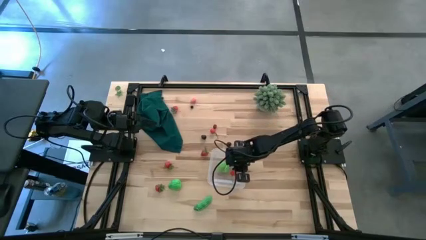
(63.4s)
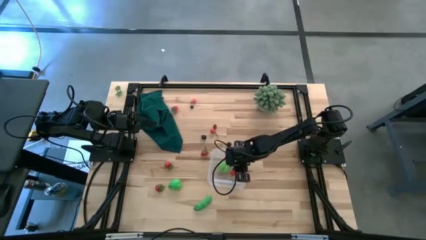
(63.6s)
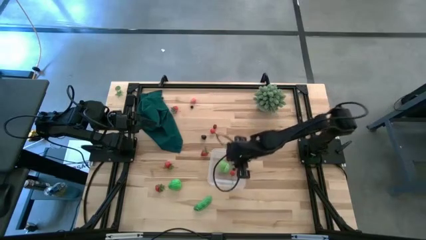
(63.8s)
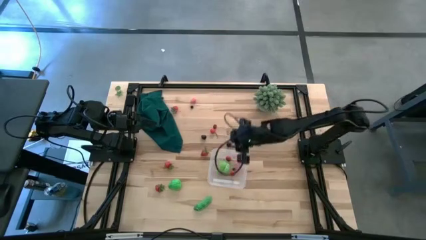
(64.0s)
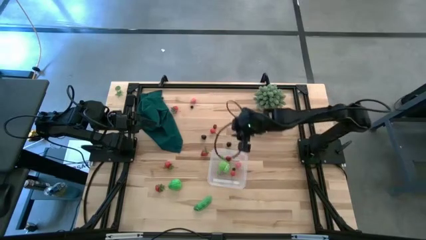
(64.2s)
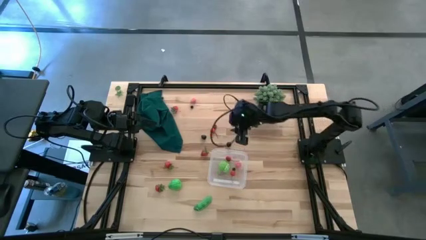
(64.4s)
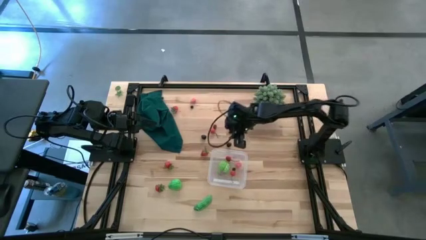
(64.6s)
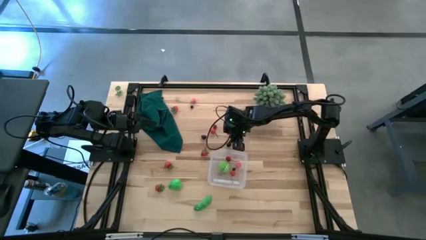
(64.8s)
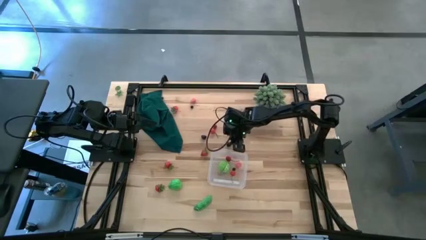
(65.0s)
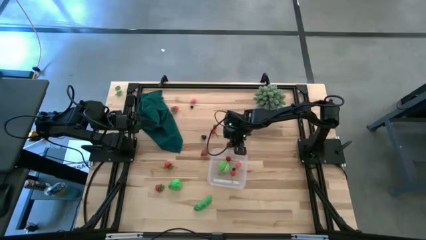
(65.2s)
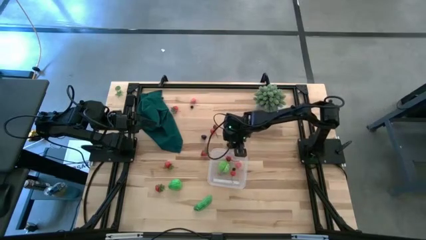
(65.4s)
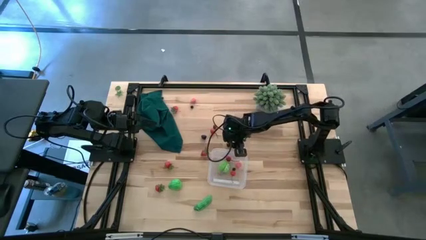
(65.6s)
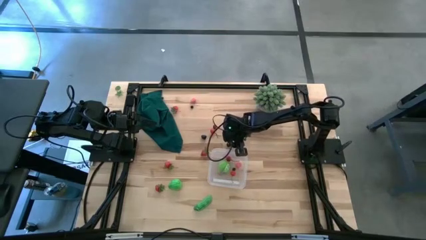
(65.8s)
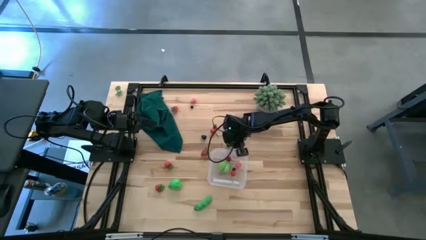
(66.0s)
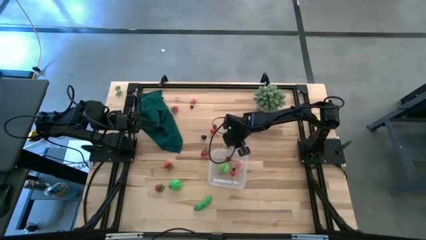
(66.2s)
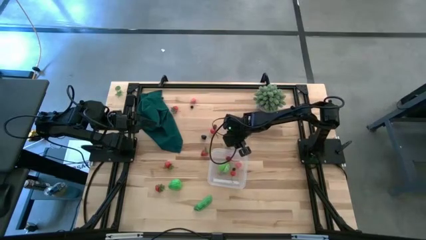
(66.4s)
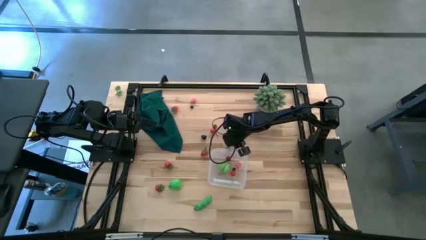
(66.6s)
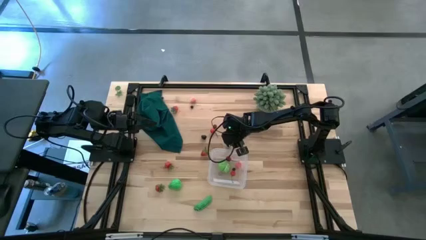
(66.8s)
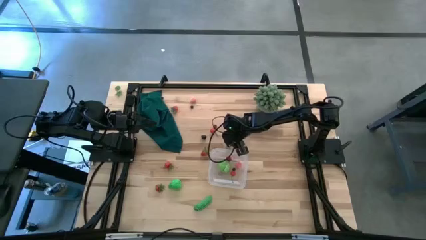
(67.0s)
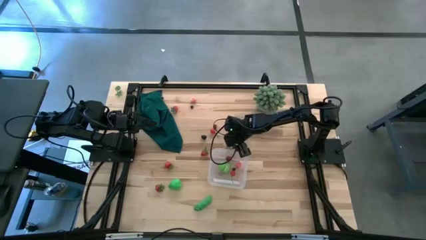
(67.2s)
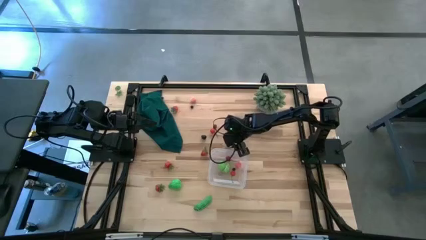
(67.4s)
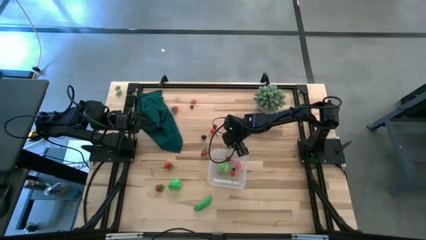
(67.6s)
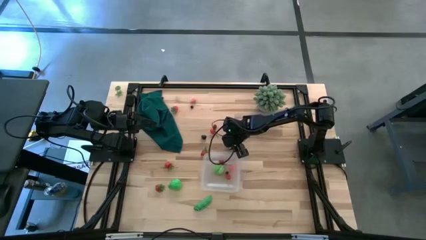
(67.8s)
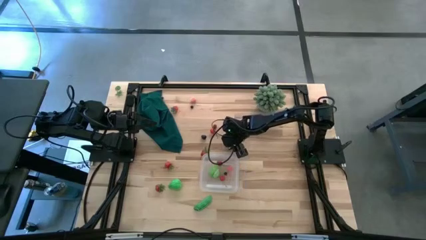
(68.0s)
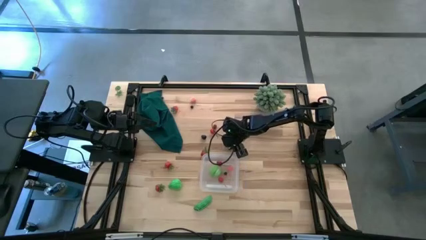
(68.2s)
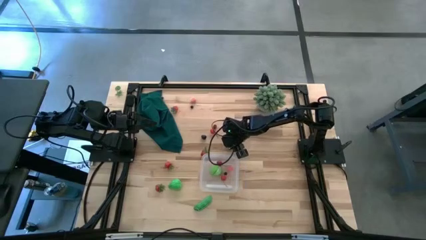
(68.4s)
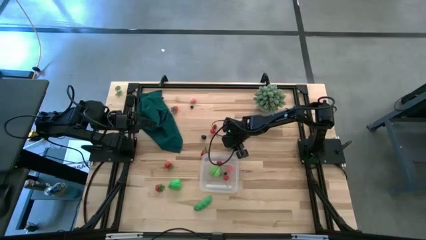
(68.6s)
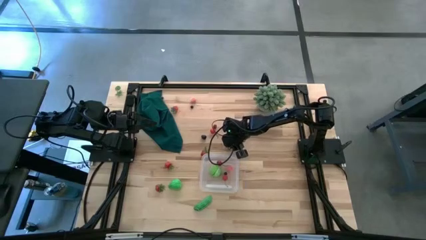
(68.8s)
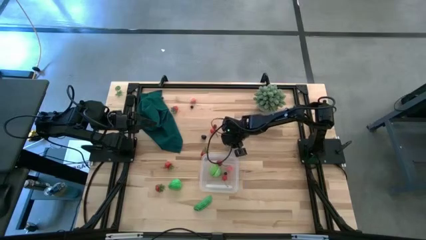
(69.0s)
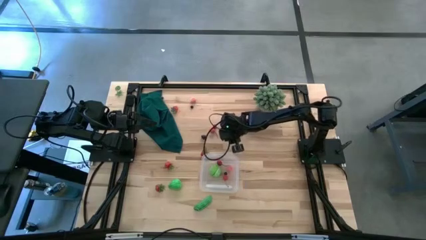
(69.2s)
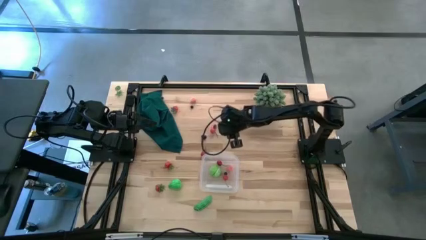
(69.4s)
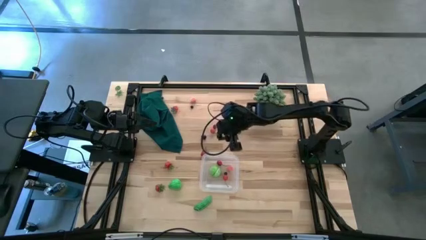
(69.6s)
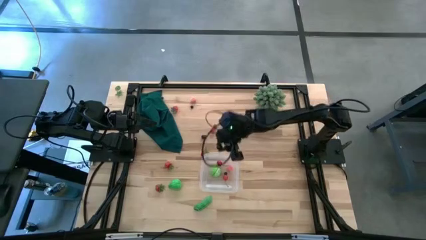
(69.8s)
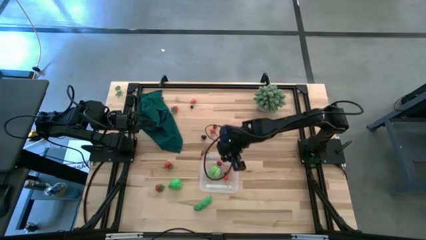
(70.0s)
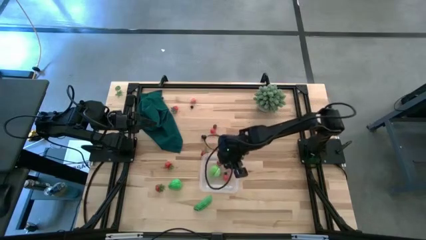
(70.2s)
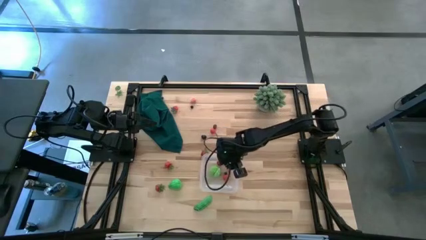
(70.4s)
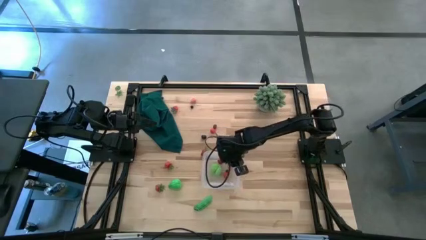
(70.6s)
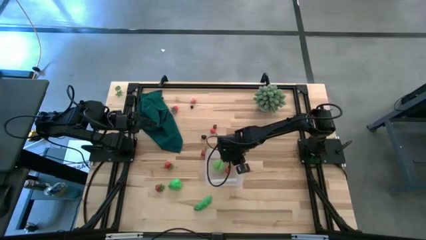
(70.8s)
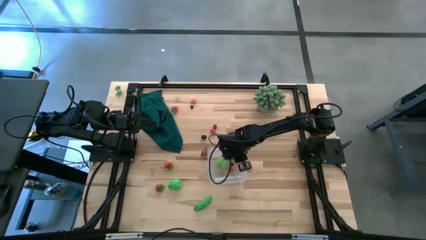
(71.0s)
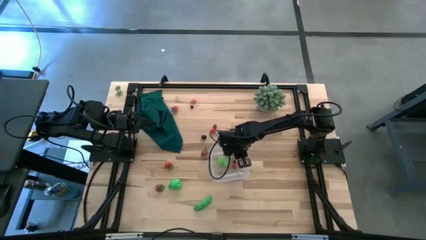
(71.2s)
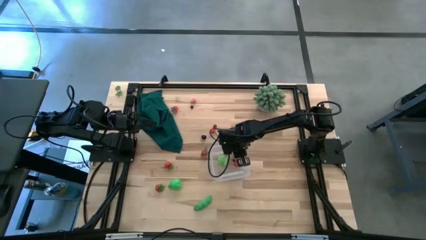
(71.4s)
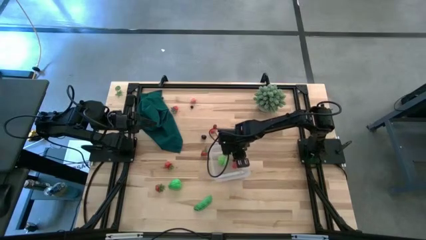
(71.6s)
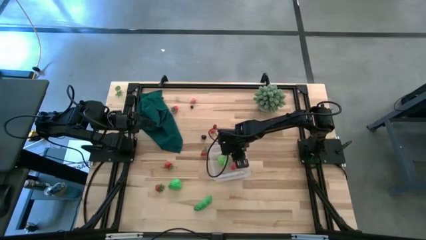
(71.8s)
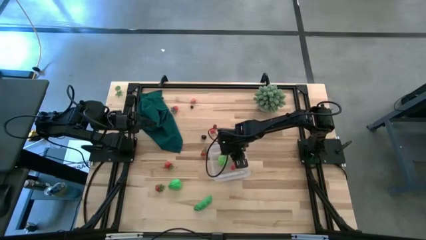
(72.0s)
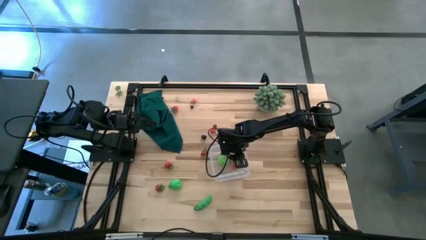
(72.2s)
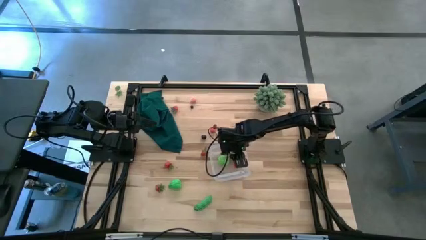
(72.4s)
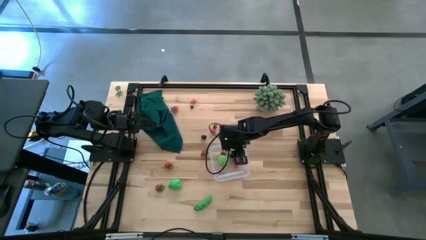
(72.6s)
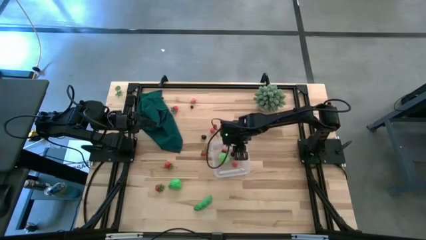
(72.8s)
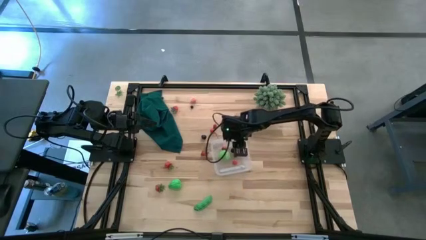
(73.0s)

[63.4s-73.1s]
Task: Pick and placing Produce into tupperware
Put the right black cherry into the container

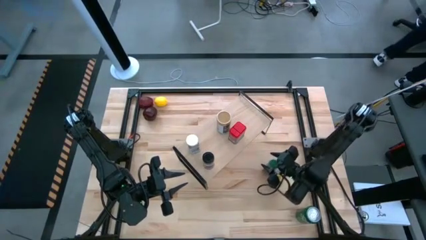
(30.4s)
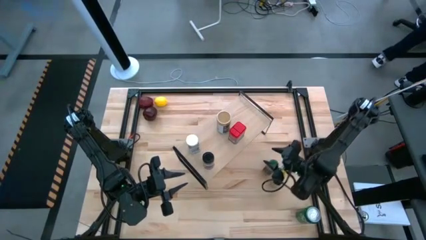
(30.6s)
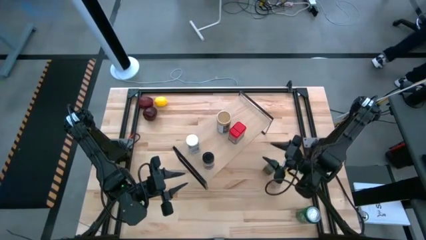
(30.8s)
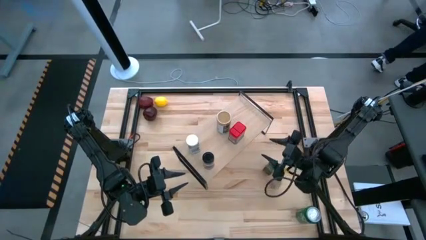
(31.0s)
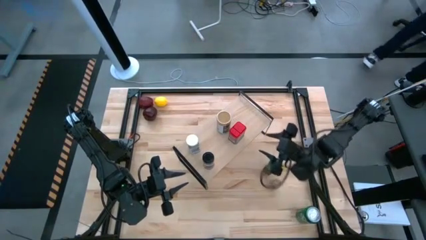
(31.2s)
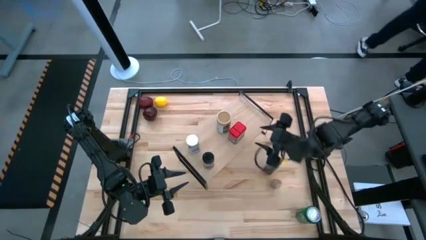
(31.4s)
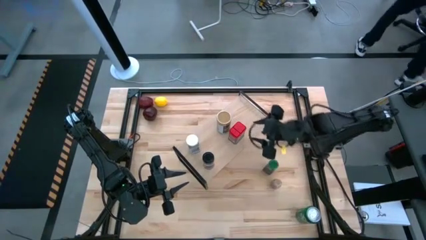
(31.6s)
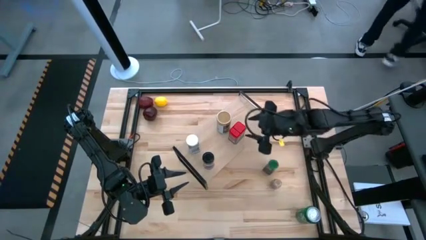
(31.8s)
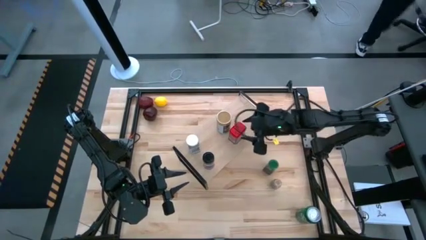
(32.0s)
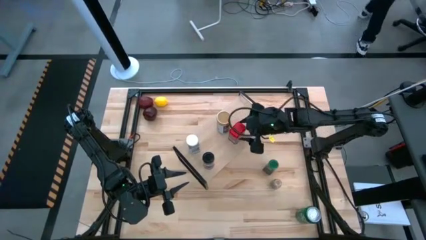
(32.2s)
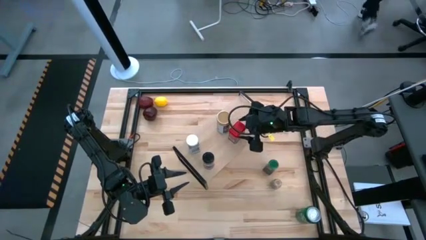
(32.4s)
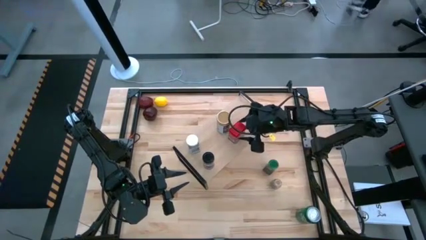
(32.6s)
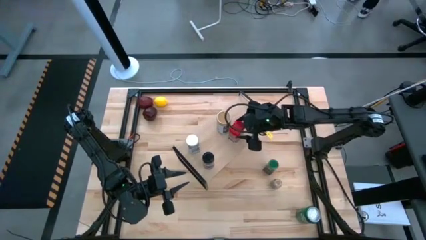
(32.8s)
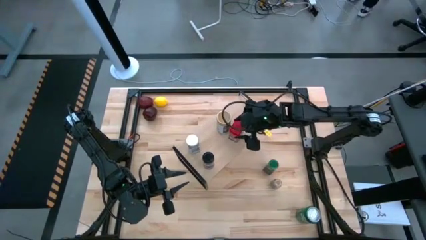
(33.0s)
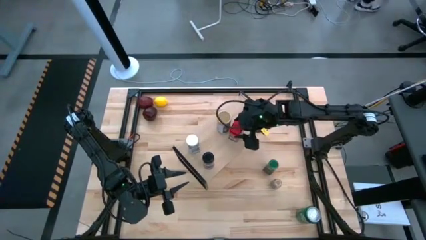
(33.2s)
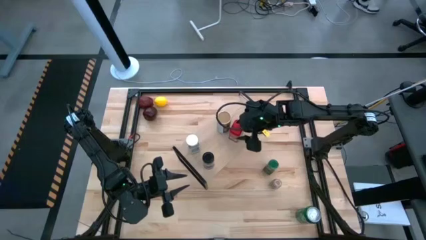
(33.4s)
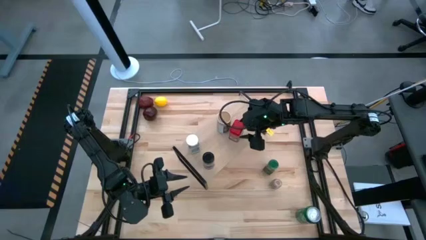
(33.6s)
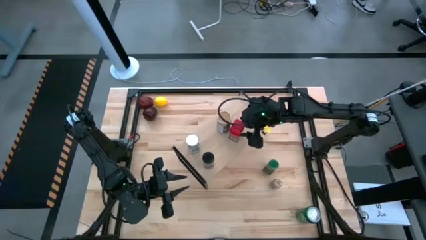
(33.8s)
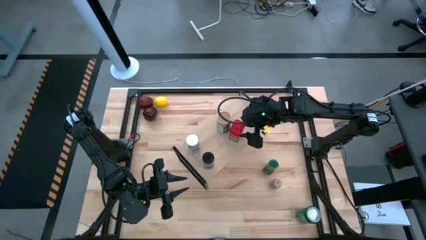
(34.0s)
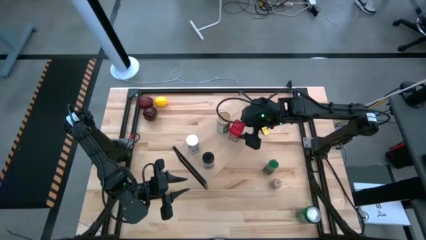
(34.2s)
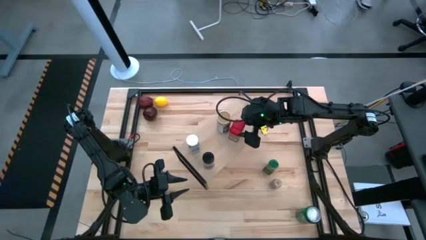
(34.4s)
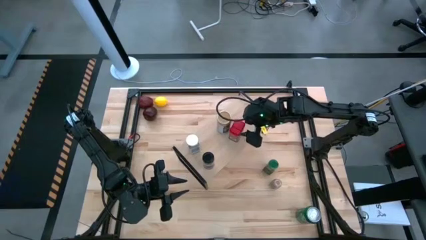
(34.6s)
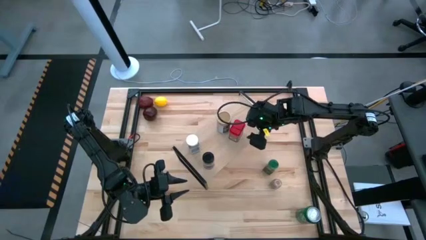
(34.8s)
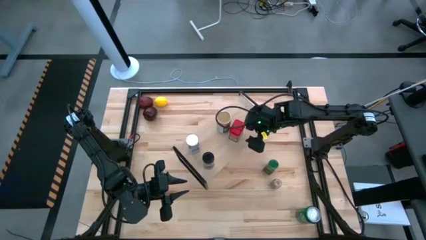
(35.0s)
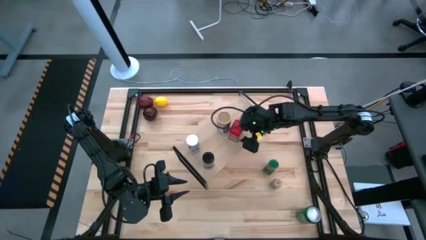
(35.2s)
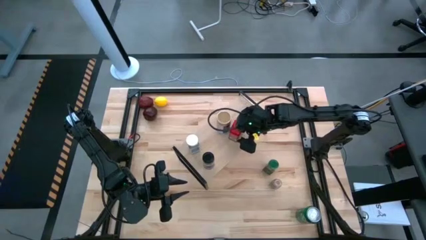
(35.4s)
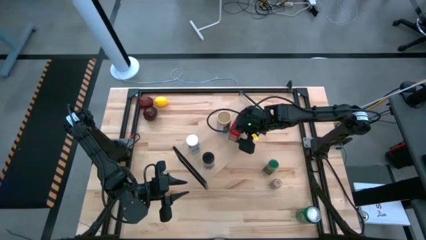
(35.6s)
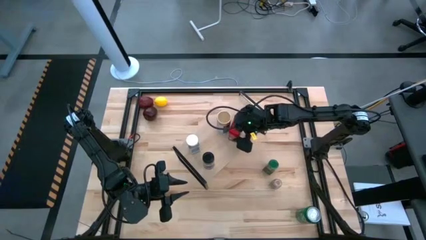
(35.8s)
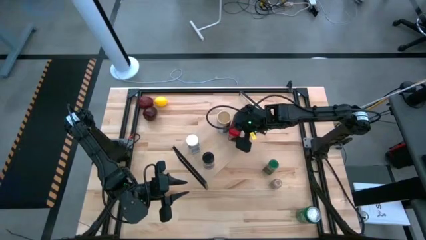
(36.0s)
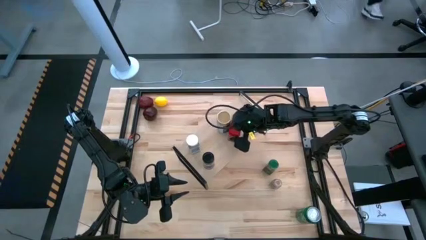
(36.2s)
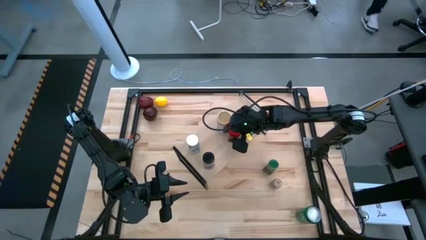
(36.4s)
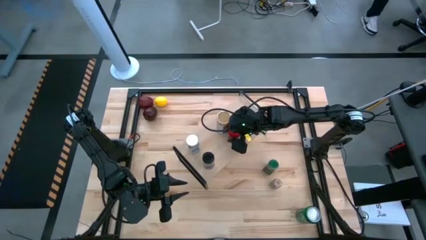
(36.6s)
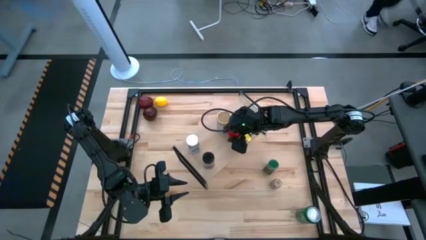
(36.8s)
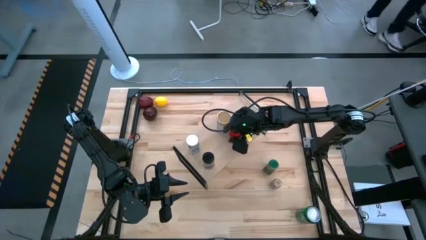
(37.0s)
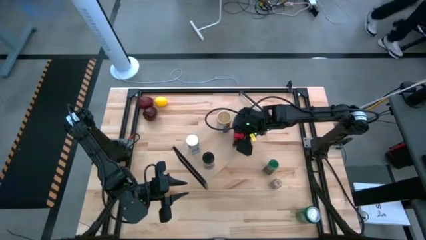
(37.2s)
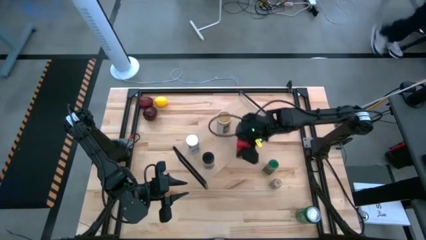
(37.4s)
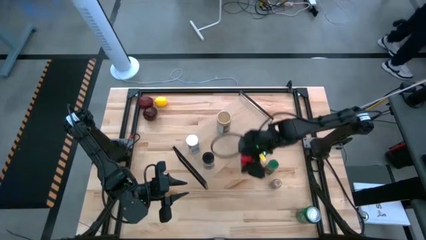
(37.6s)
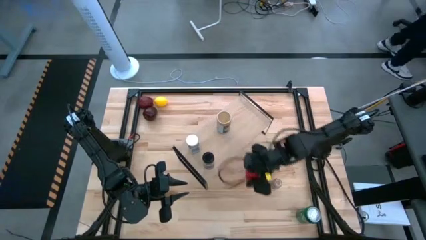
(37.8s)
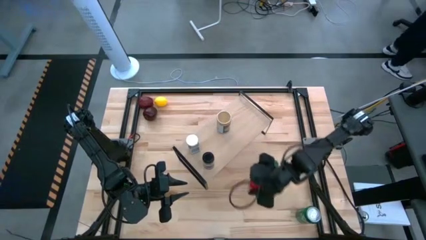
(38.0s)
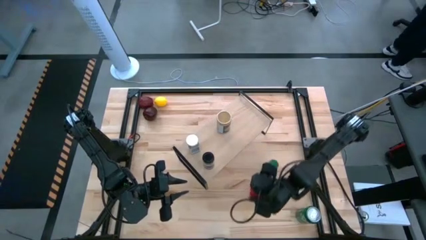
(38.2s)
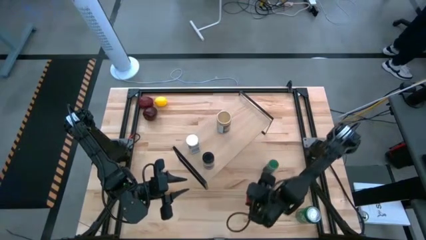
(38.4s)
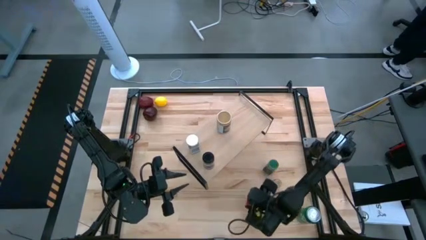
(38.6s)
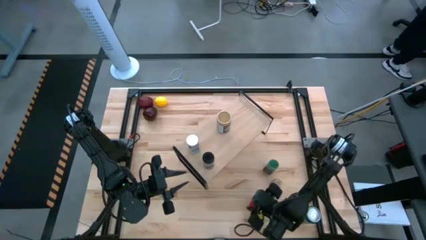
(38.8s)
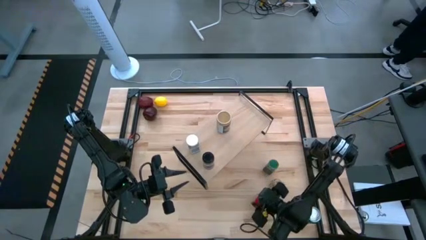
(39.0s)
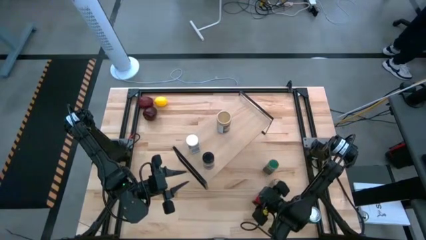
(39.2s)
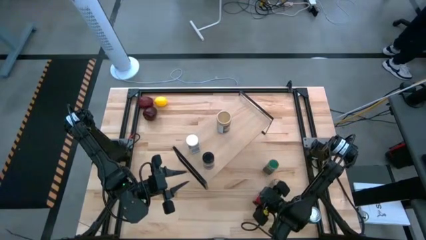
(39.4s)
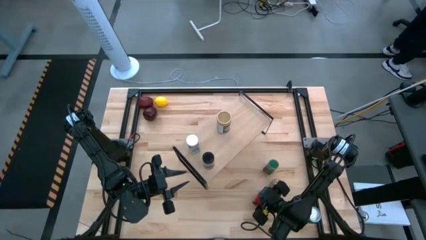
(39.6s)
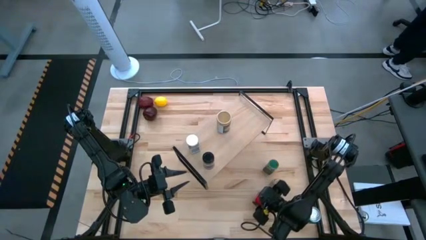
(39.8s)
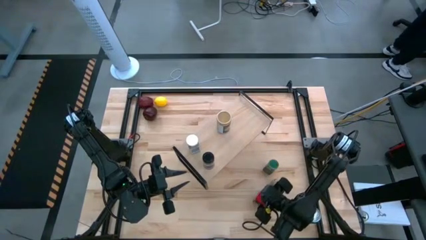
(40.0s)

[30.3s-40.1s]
Task: Shelf spices
Remove the red seasoning can from the shelf
